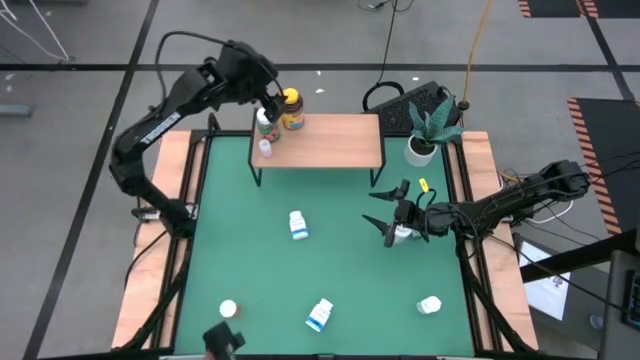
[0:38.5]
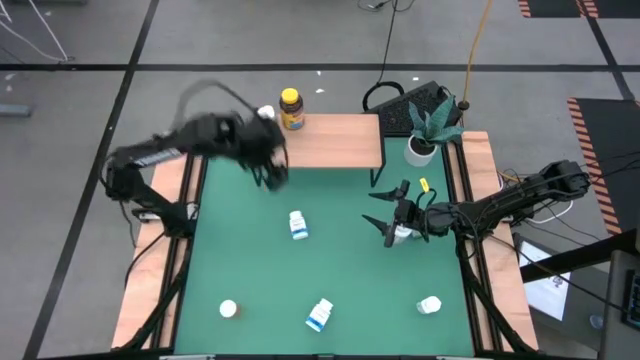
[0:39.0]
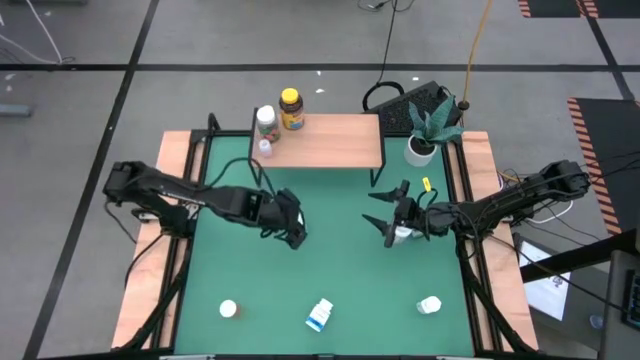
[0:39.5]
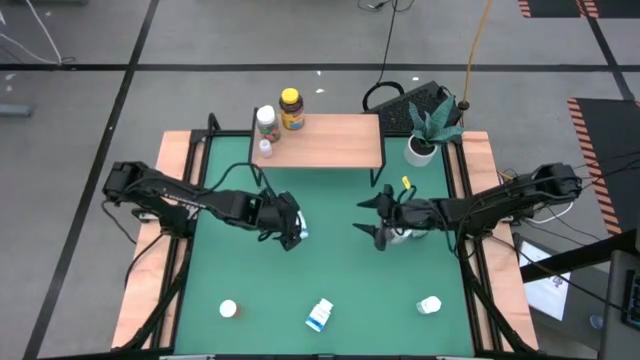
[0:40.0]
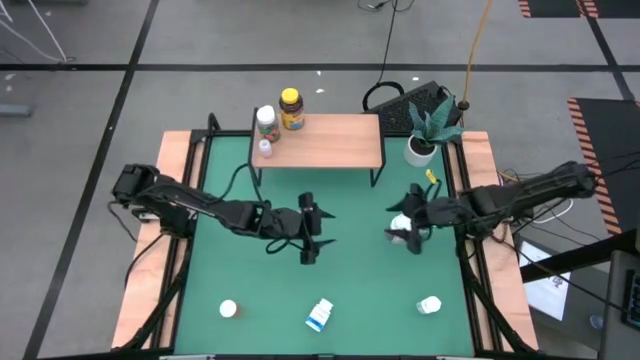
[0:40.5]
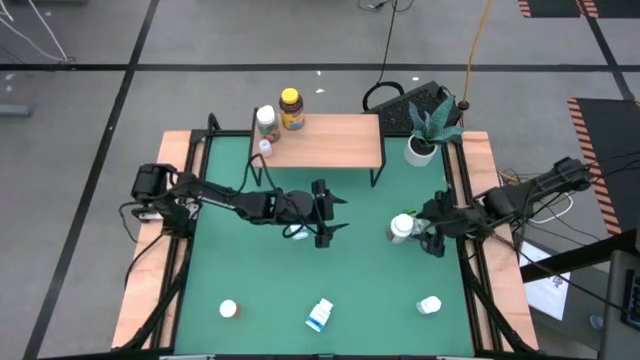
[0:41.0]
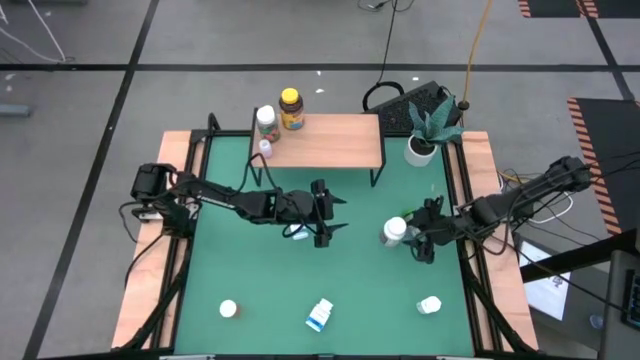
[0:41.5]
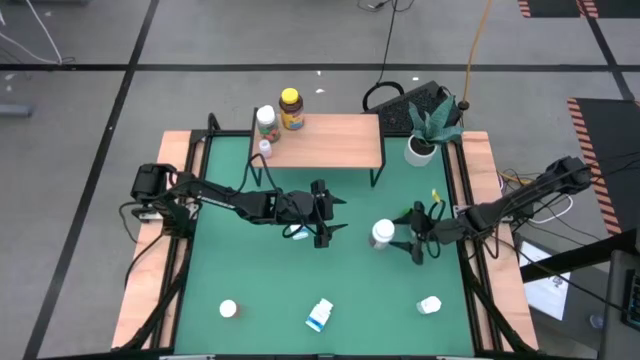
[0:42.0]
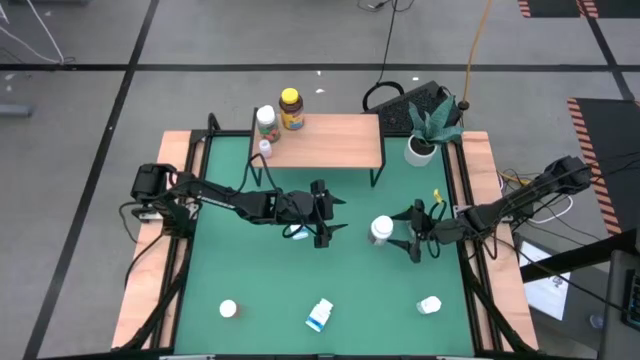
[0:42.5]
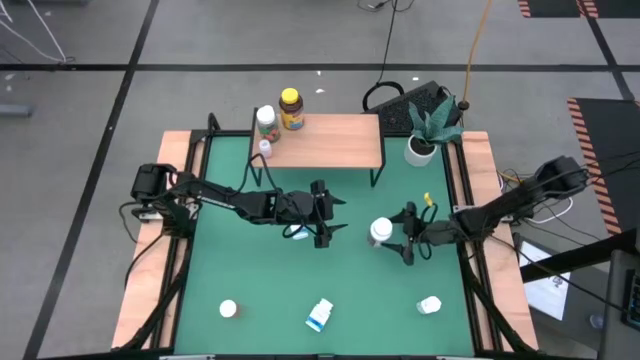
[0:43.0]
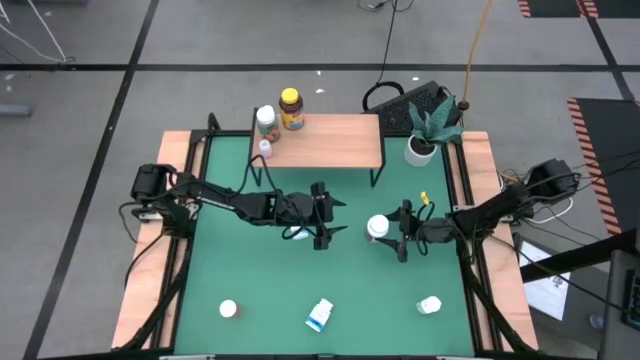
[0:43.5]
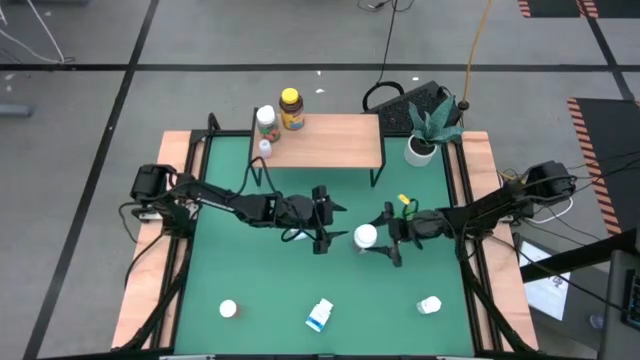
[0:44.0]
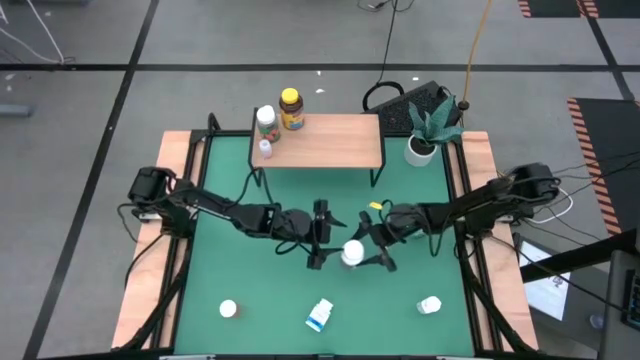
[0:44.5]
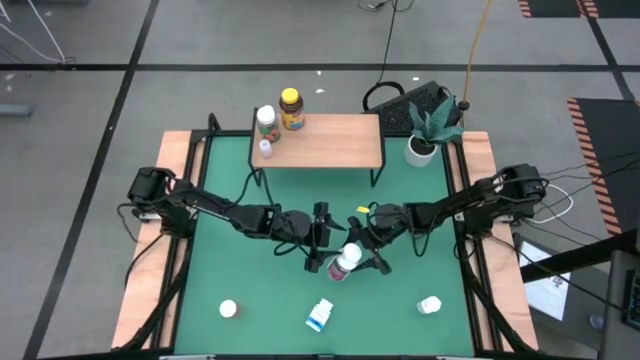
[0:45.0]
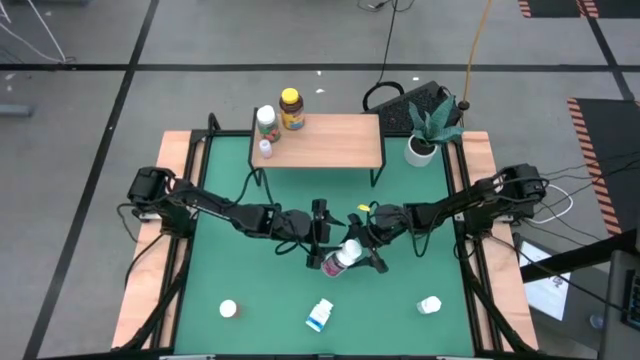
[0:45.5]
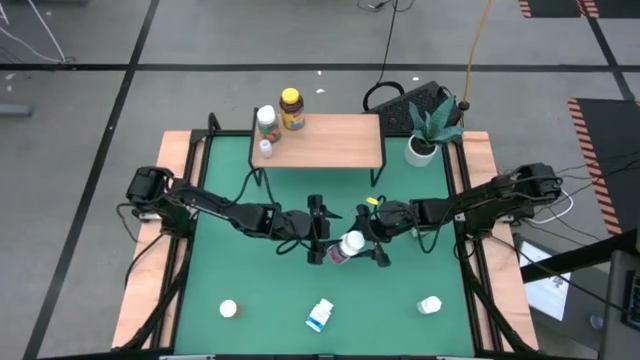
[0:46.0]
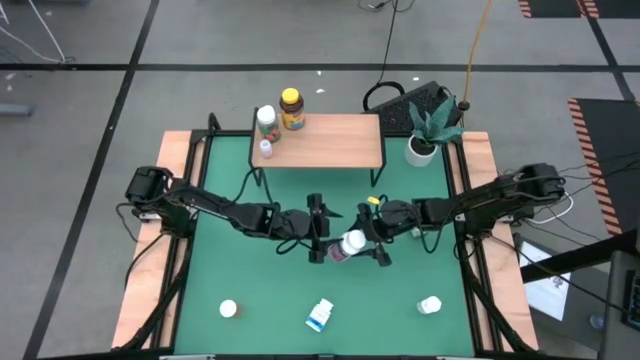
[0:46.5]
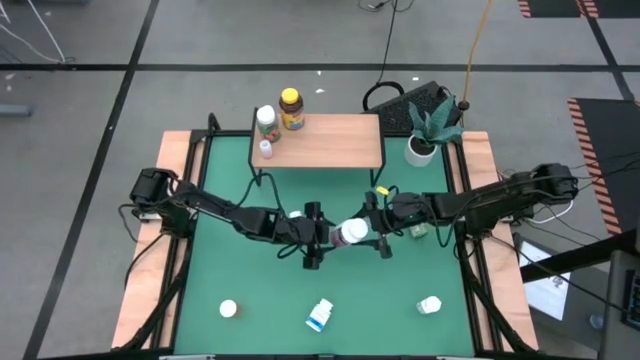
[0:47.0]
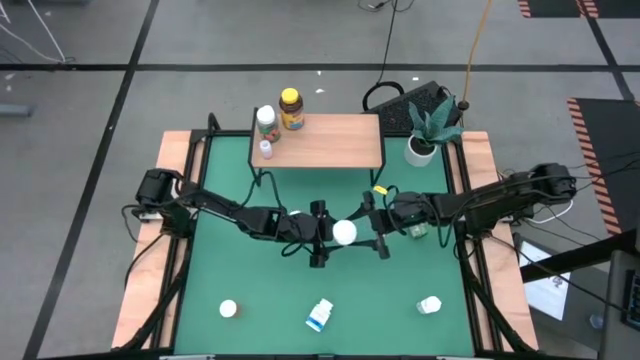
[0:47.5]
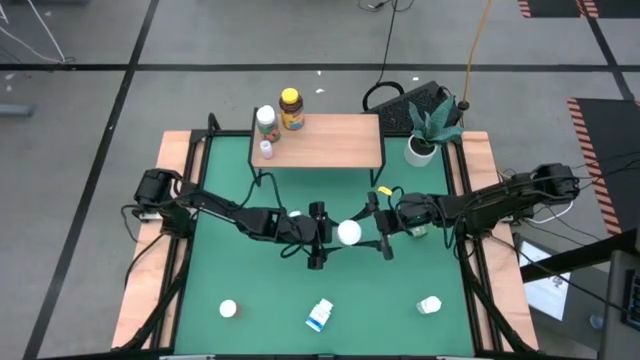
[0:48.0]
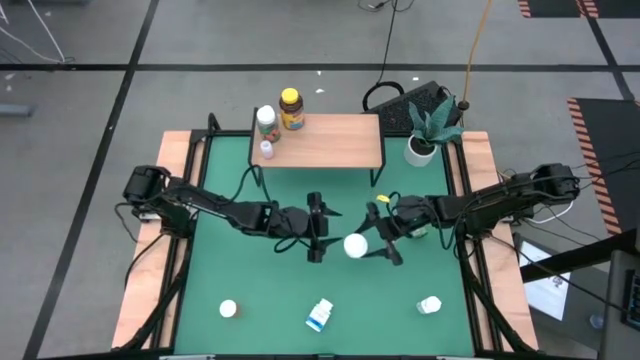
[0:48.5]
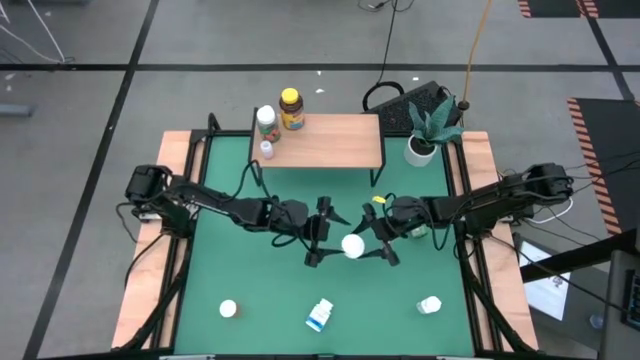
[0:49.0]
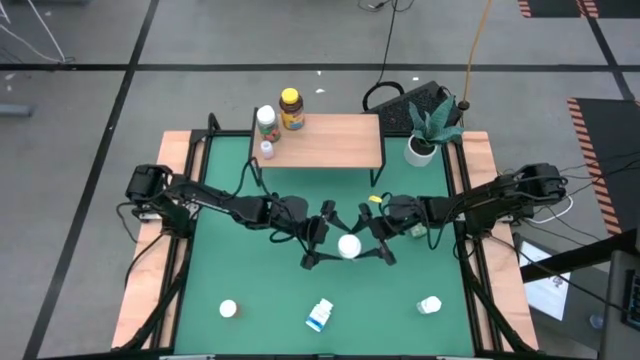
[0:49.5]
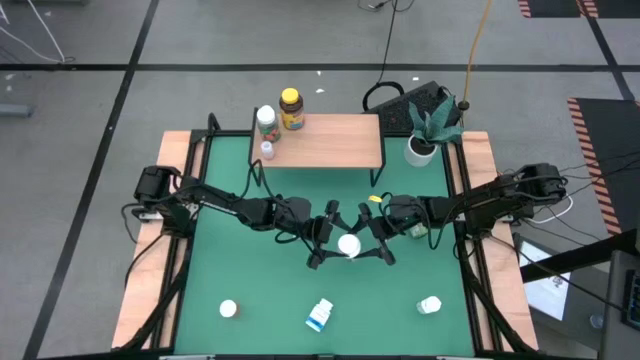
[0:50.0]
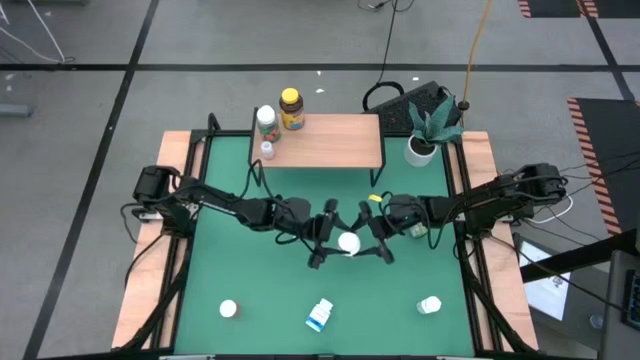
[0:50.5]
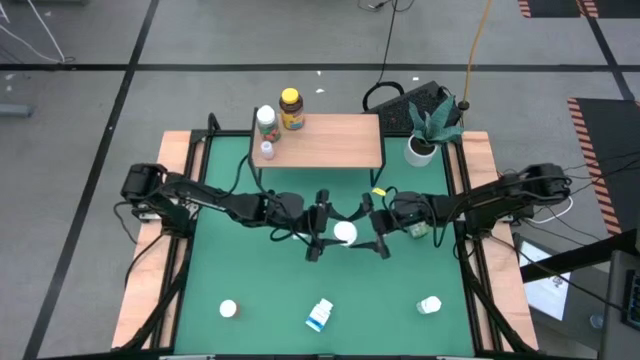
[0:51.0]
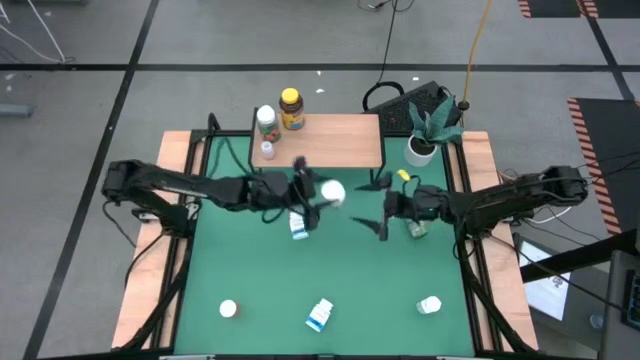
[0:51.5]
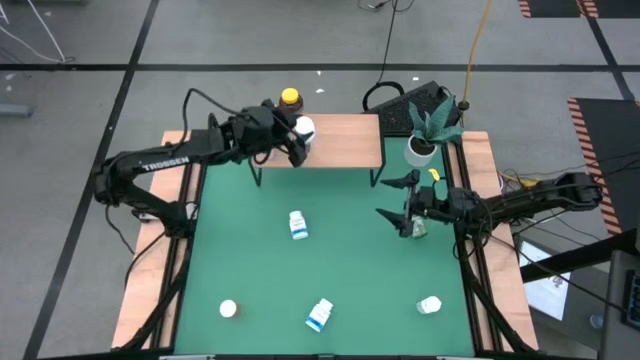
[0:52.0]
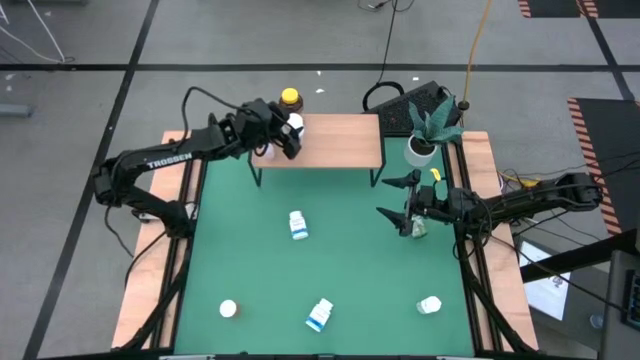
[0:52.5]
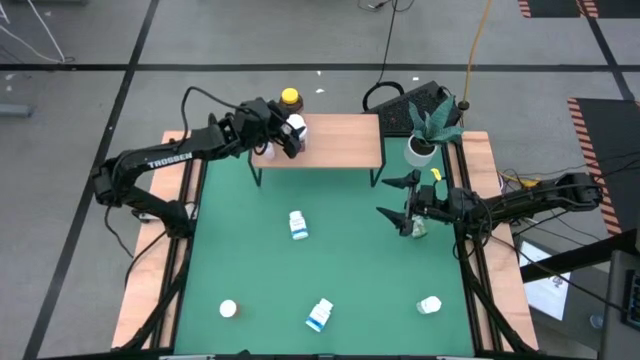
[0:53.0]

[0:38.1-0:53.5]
Task: Pick and place medicine bottles onto shelf by color
Put the white violet medicine bottle on the shelf

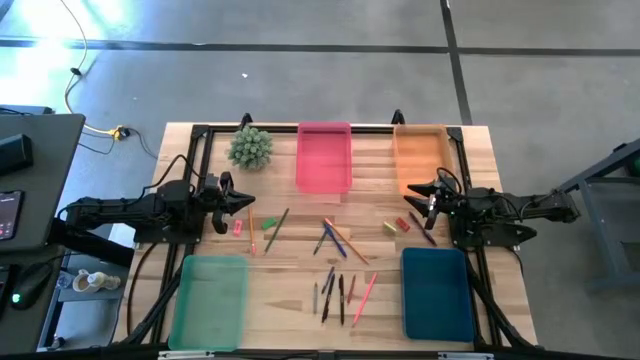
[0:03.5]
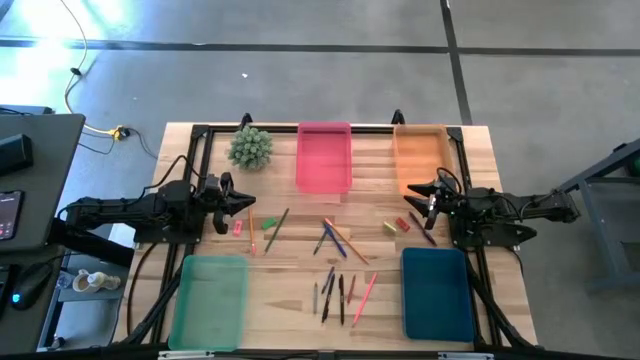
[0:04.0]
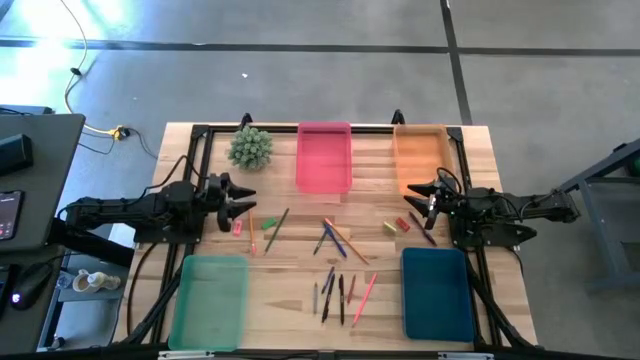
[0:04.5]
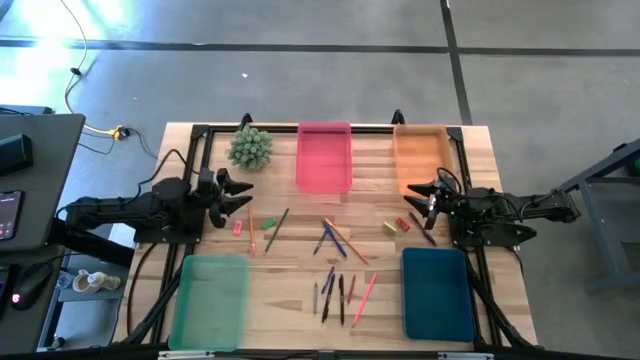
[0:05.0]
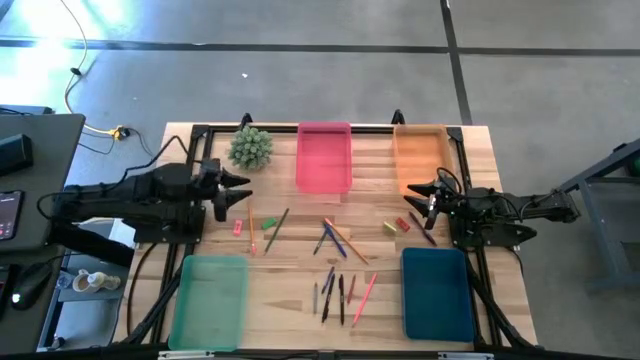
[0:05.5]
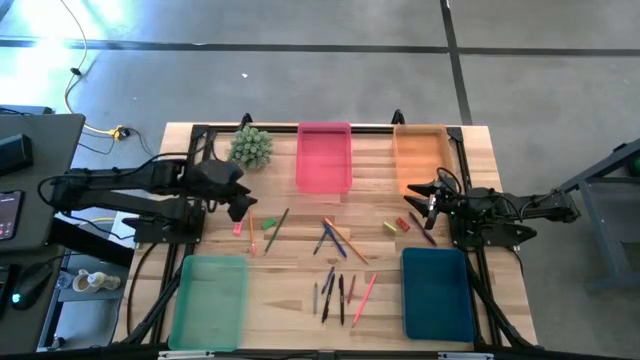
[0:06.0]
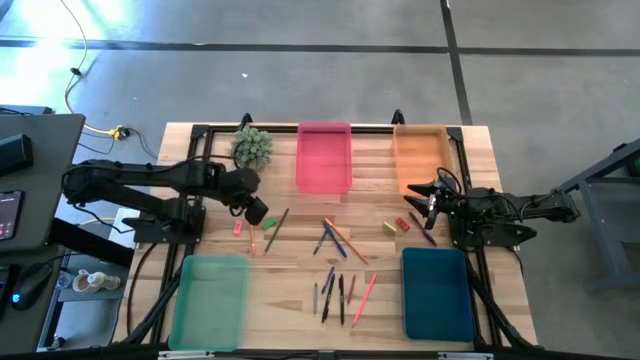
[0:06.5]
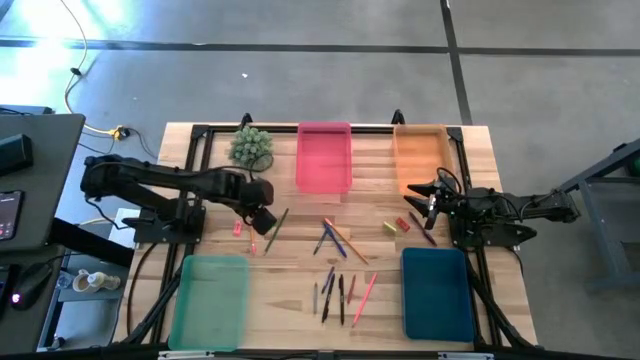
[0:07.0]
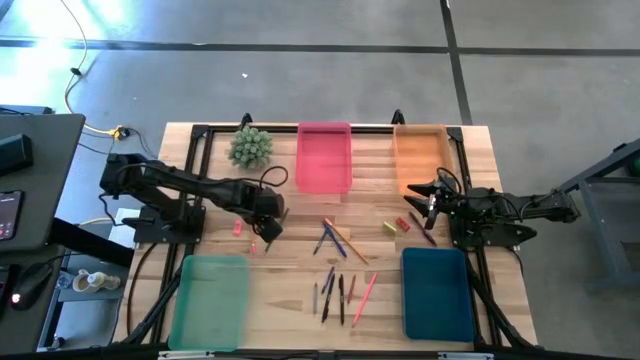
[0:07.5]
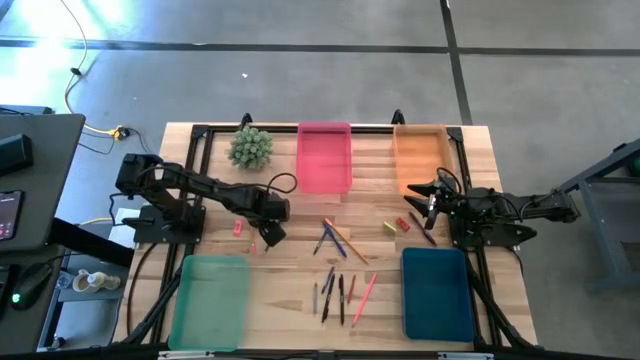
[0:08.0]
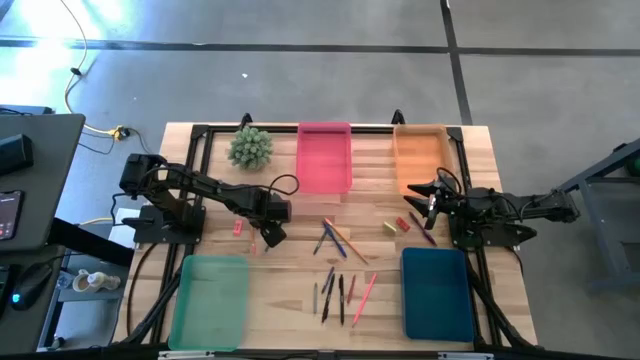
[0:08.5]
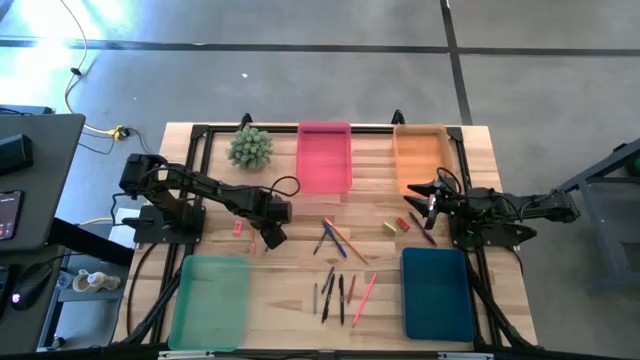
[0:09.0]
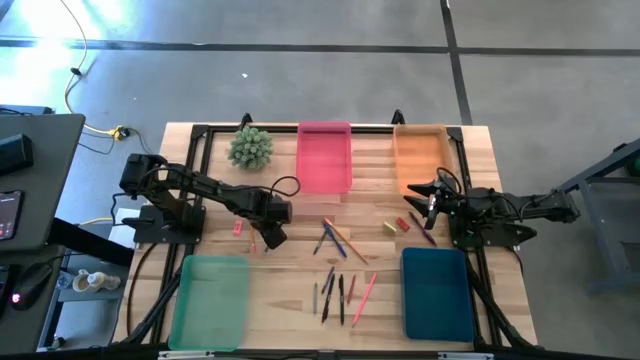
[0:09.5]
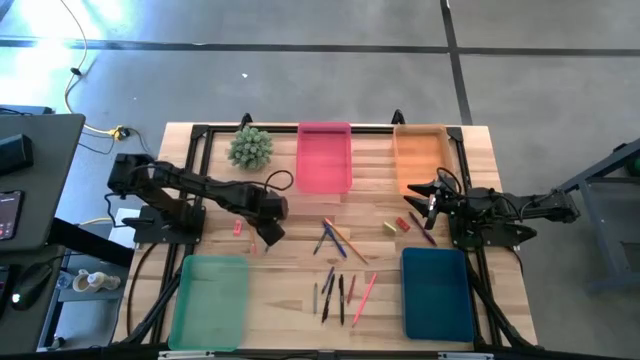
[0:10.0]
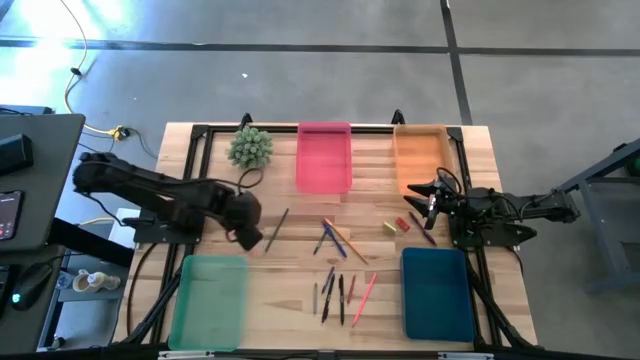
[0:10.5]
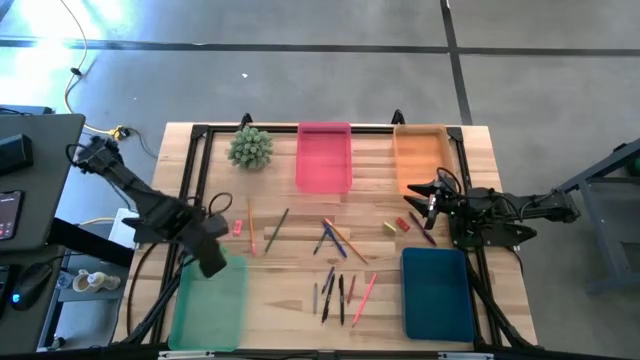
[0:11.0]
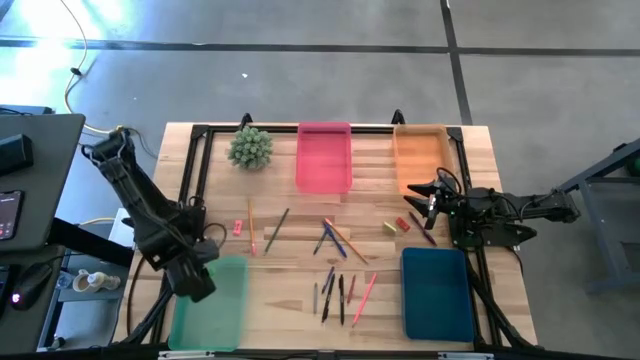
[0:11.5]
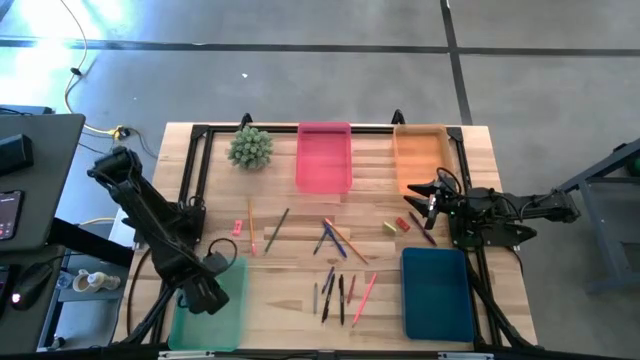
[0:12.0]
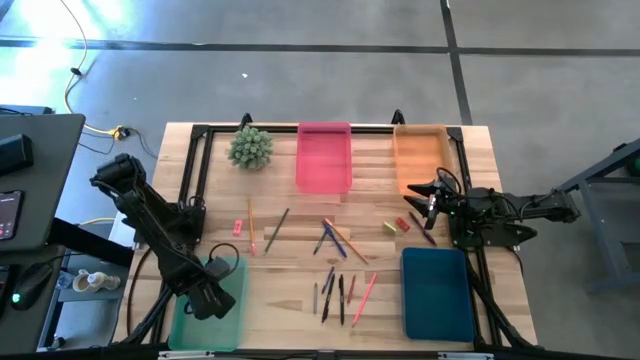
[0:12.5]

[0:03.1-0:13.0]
Task: Sort crayons/erasers/pens/pencils in bins
Put the green eraser into the light green bin
